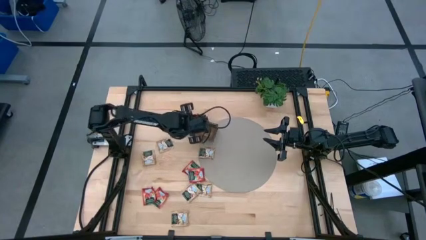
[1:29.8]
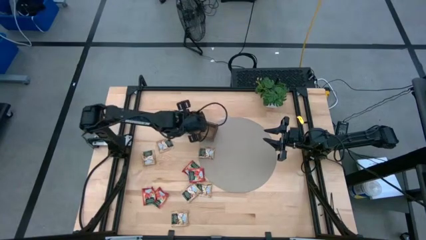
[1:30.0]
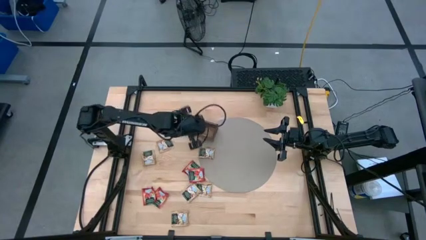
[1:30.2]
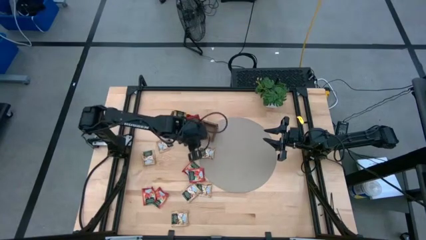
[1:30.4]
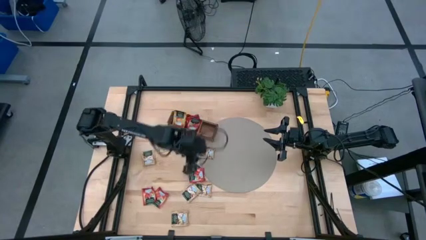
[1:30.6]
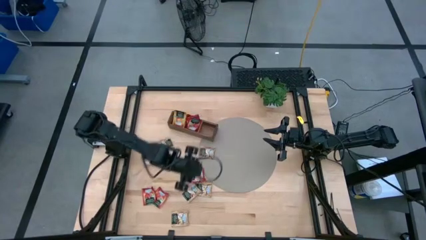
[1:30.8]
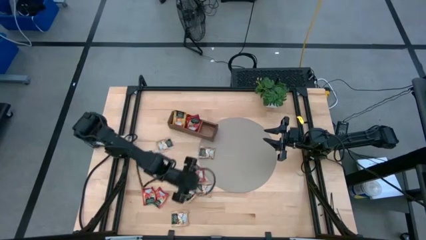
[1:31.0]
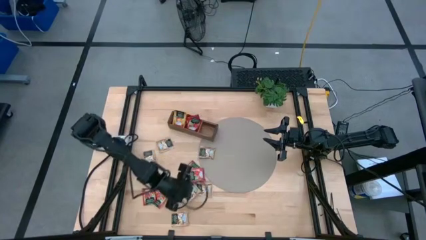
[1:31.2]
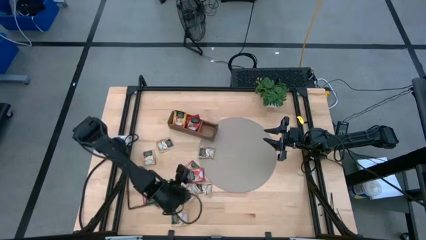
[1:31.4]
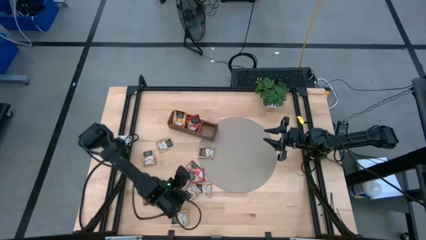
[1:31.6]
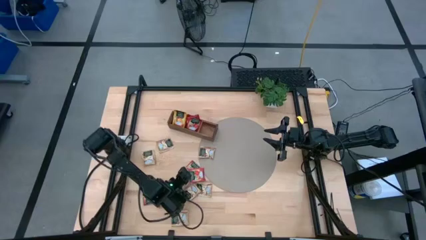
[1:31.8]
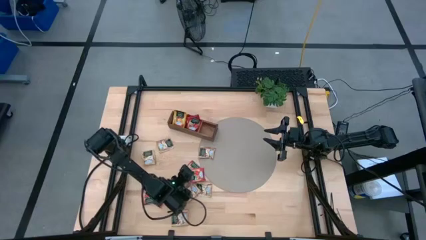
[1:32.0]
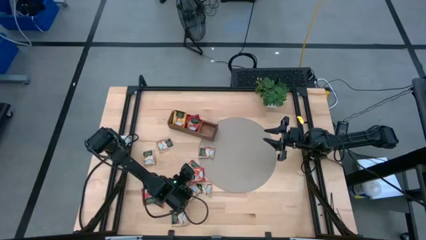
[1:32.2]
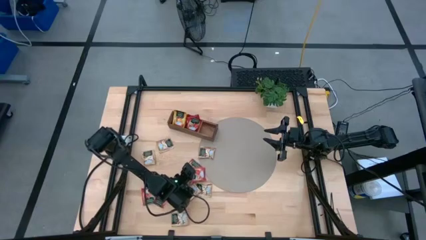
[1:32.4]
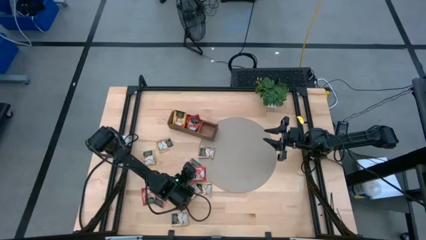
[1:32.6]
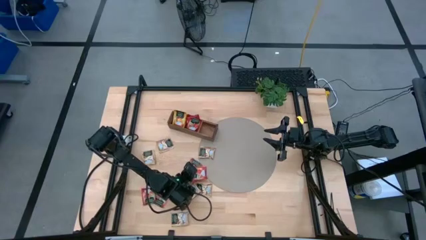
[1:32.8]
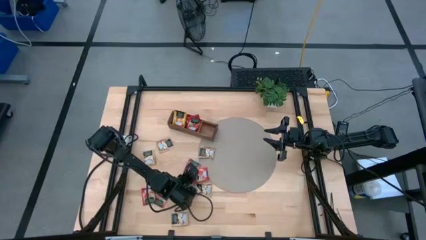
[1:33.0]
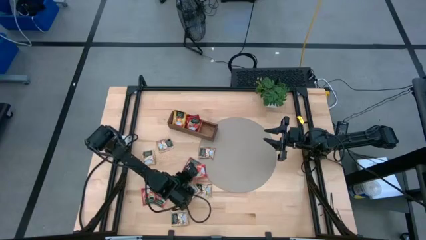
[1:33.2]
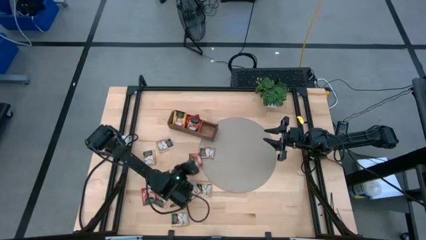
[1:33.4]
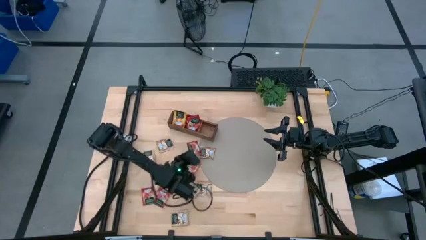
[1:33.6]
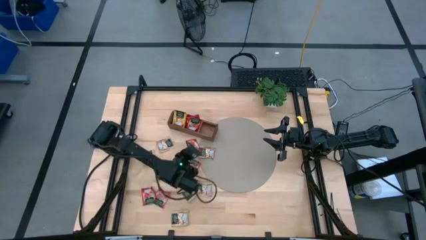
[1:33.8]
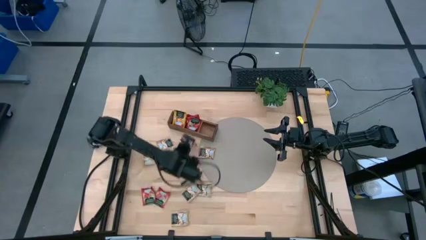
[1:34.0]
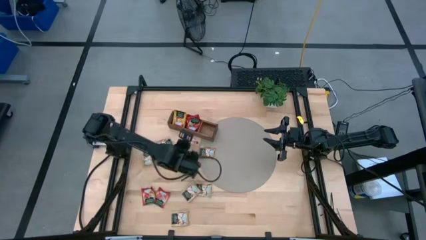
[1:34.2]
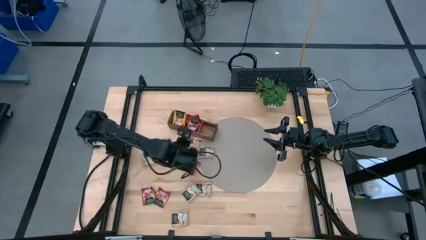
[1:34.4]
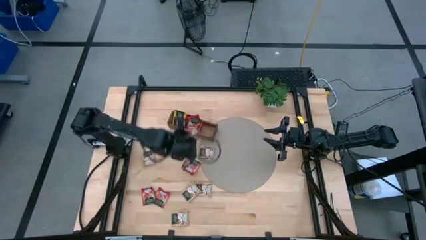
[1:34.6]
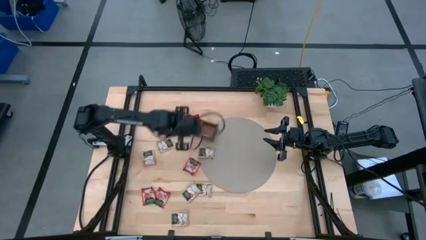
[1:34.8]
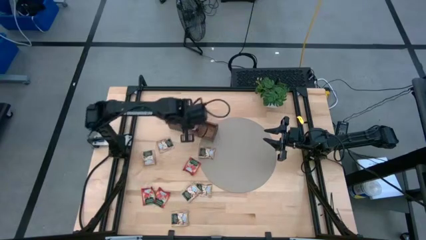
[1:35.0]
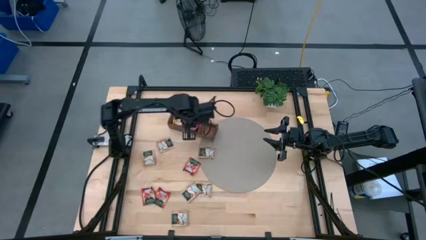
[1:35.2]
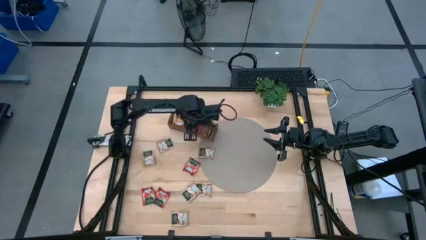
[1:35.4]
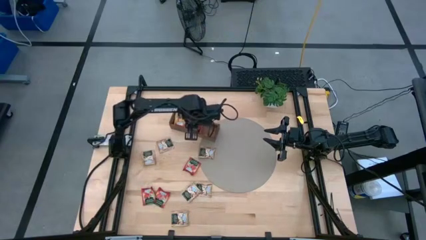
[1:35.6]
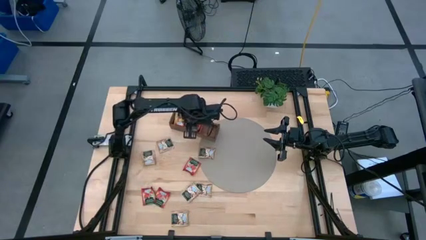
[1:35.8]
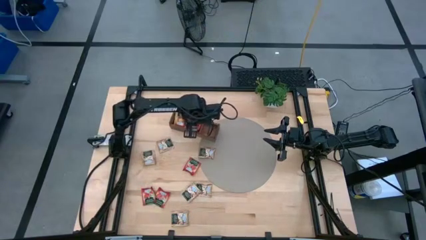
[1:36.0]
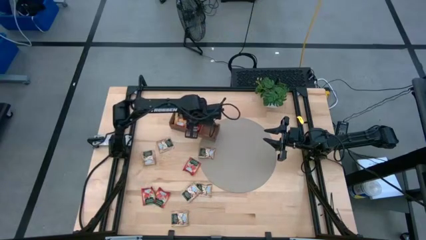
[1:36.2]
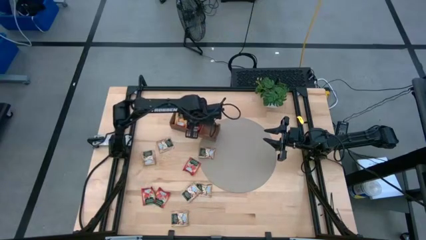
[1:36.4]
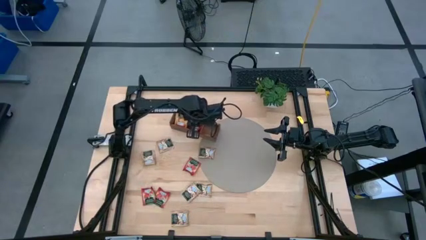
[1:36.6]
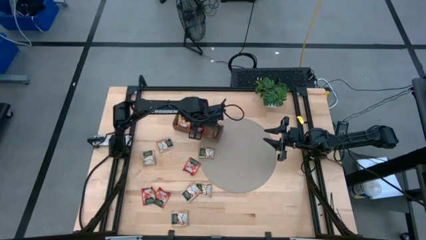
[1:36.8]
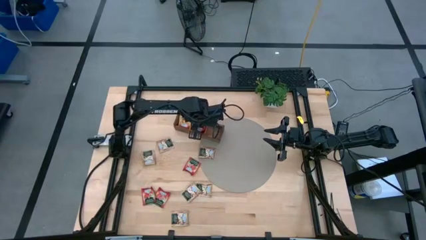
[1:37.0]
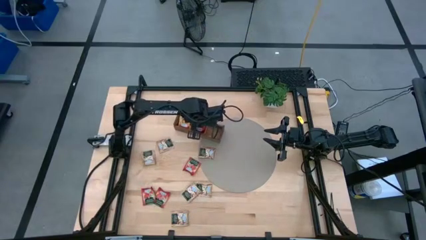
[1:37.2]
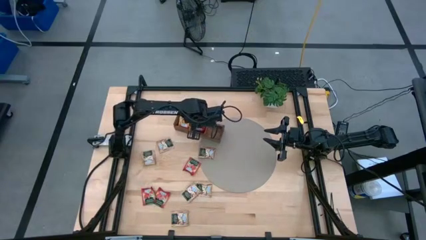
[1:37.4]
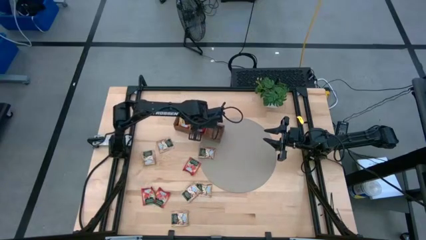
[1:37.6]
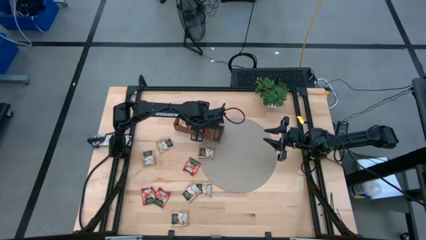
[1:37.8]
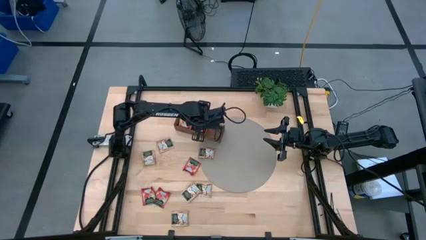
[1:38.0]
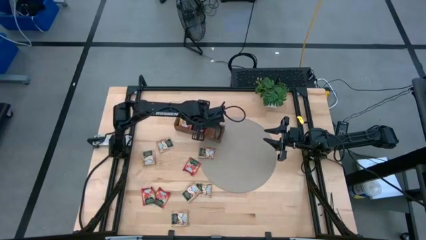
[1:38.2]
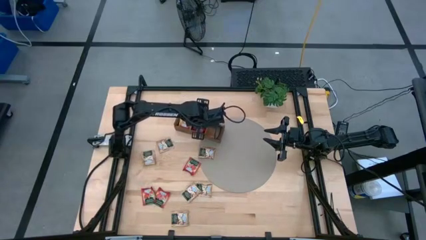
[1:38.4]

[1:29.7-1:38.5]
Task: Pick & Place Tea
Put the red tea bag into the middle section of the wooden organizer

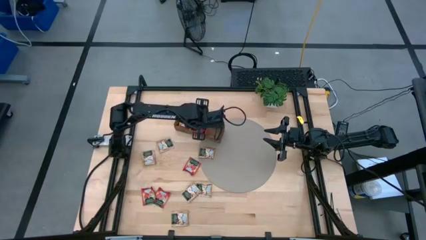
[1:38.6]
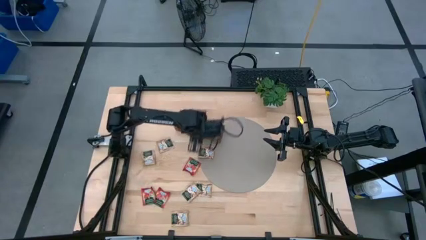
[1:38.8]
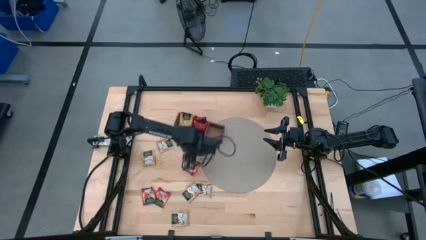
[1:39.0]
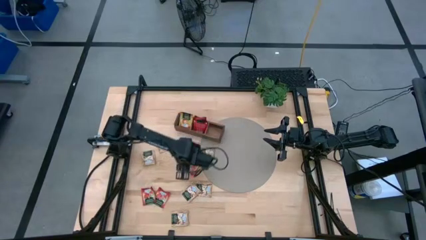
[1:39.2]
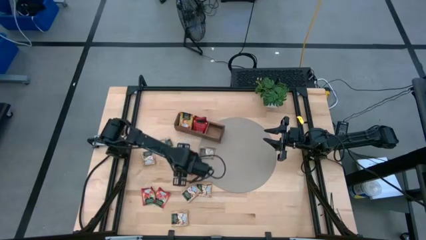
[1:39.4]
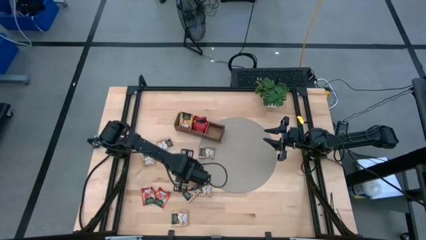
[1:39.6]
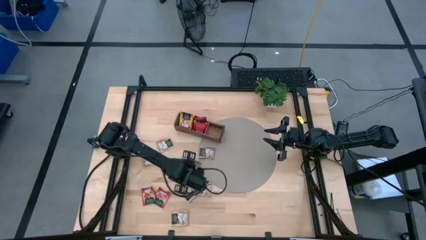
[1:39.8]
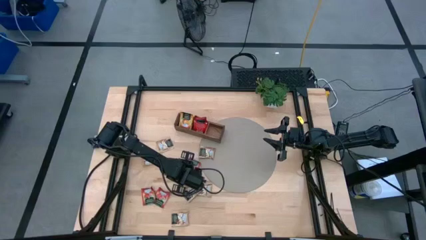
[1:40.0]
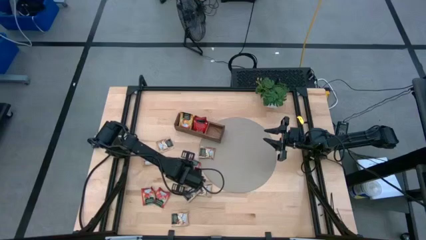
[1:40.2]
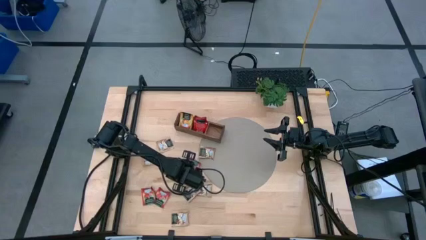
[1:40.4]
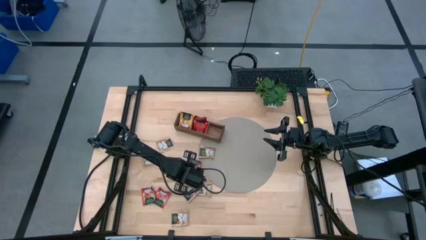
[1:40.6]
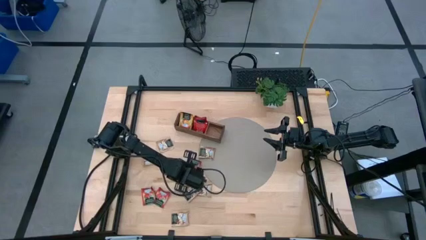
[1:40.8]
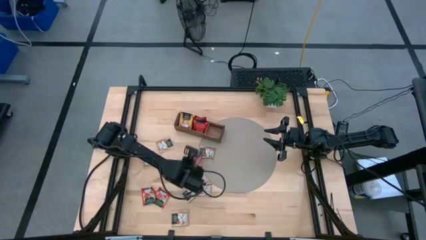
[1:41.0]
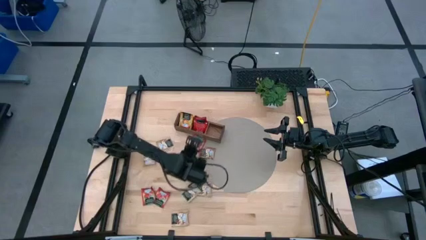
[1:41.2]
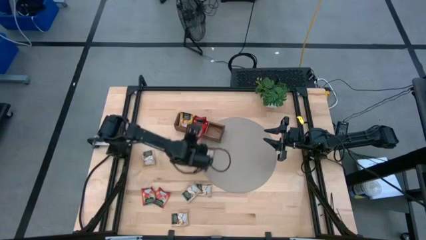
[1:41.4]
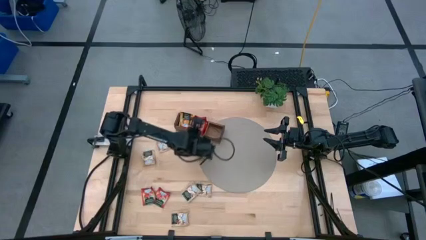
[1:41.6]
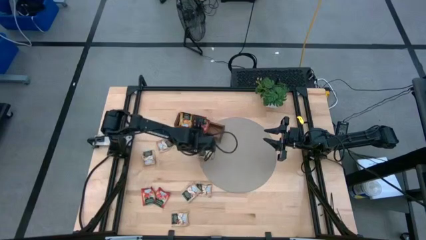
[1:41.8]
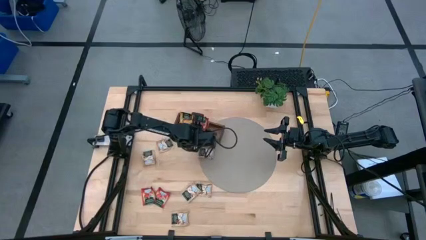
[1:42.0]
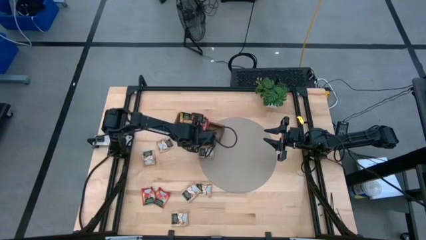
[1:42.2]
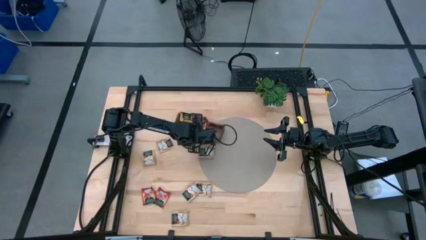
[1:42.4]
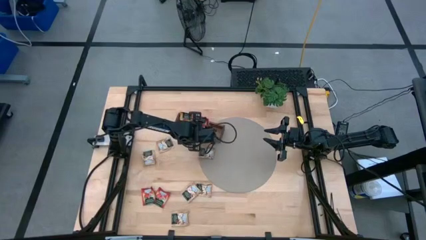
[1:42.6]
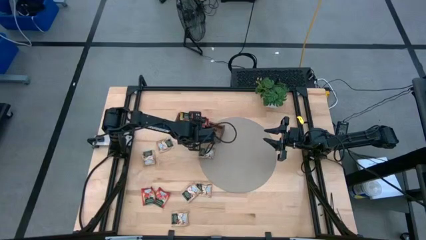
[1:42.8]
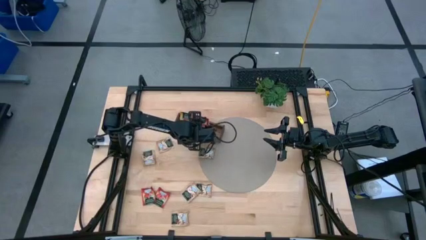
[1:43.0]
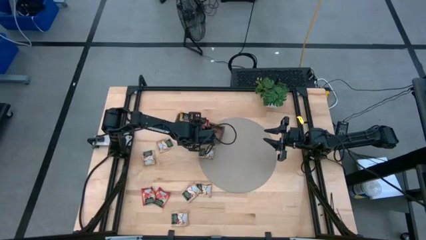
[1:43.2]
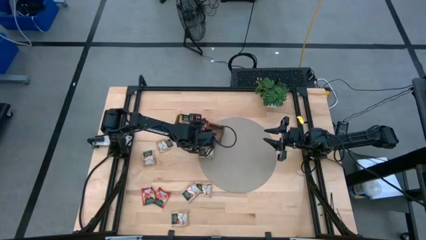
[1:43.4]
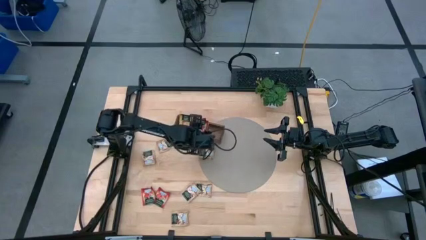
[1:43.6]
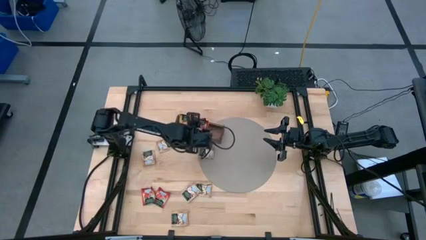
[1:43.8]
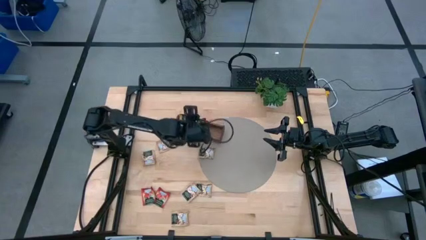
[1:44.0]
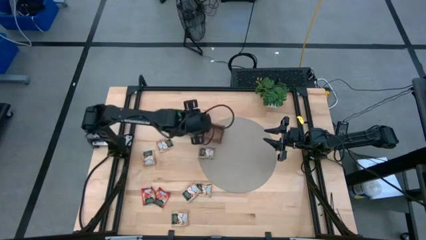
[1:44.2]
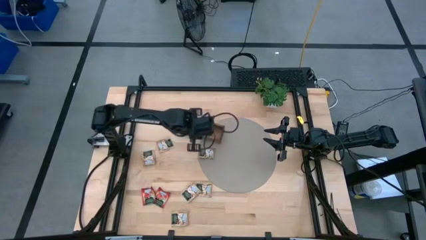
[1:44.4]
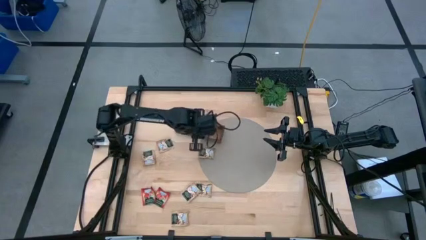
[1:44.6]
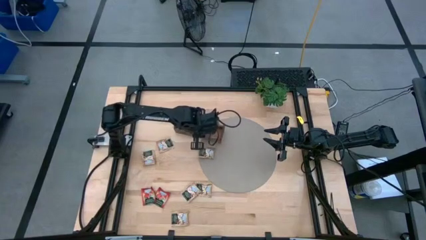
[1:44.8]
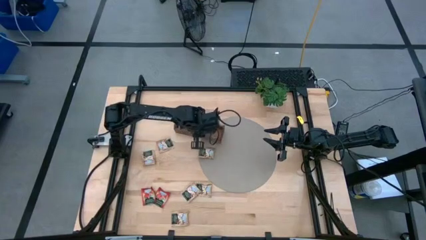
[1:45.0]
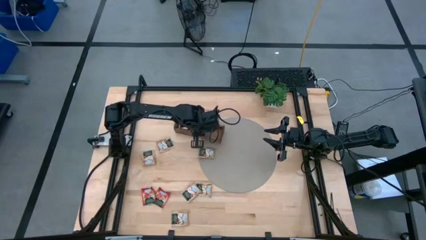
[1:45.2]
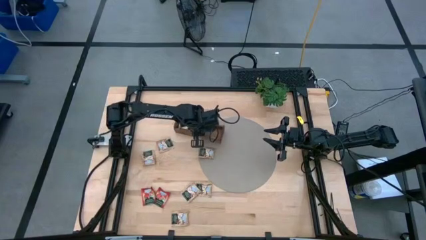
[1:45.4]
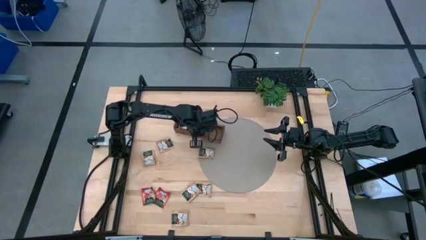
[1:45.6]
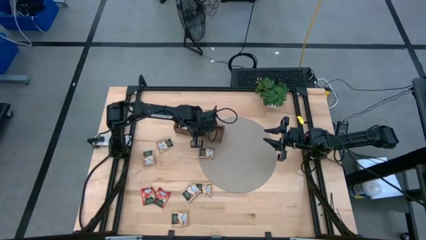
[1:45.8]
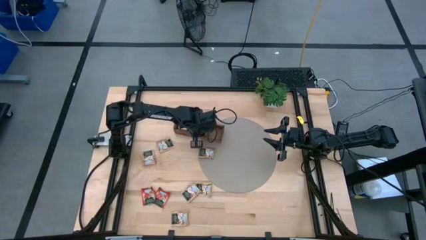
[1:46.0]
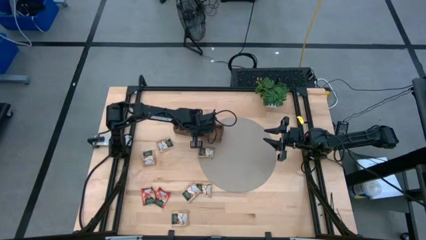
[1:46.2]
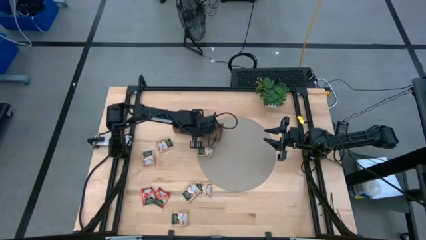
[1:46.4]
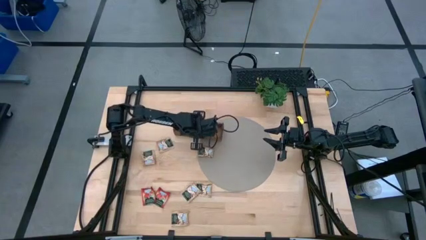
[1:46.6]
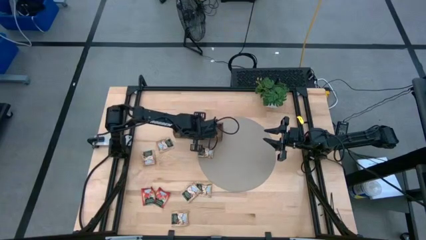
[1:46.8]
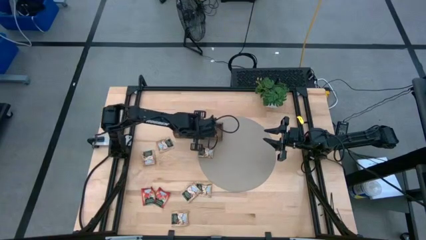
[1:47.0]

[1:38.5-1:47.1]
Put the red tea bag into the middle section of the wooden organizer
